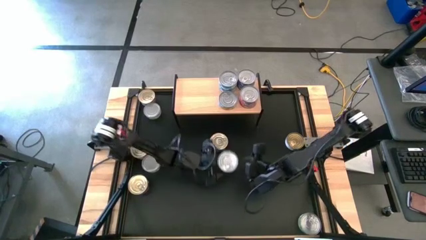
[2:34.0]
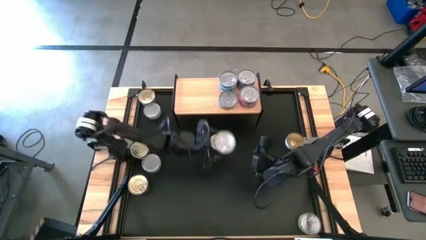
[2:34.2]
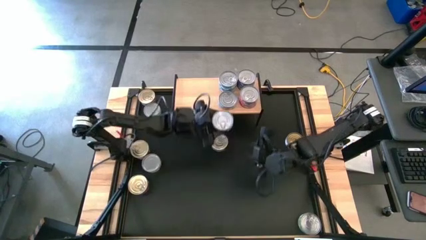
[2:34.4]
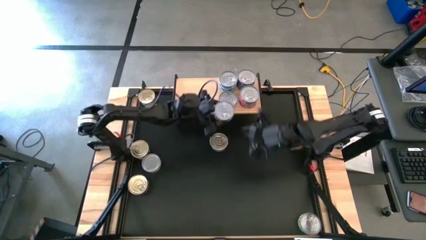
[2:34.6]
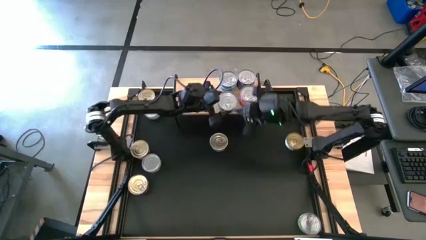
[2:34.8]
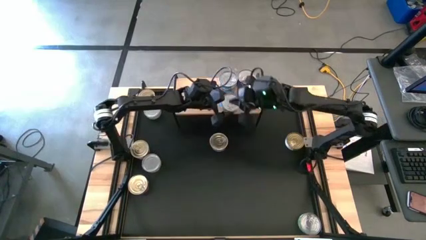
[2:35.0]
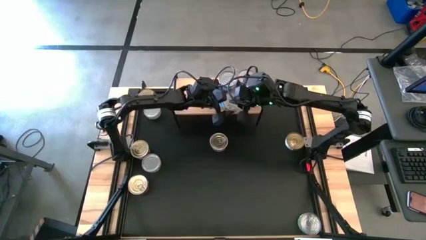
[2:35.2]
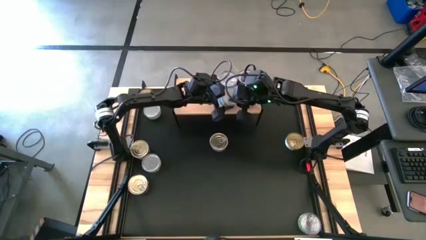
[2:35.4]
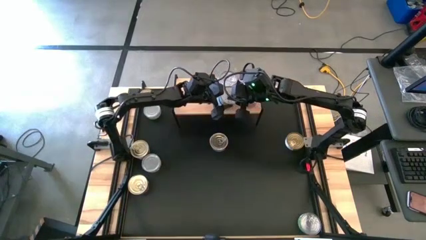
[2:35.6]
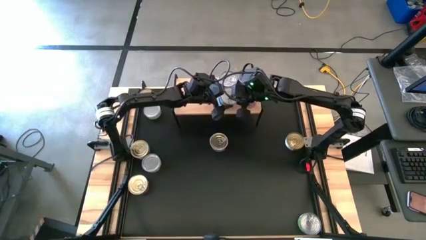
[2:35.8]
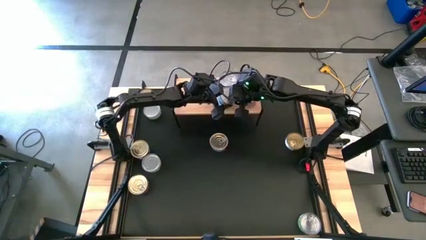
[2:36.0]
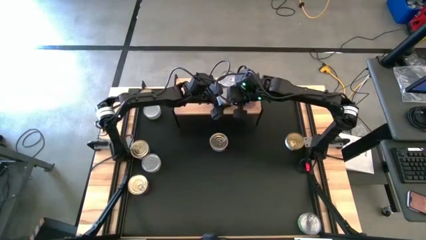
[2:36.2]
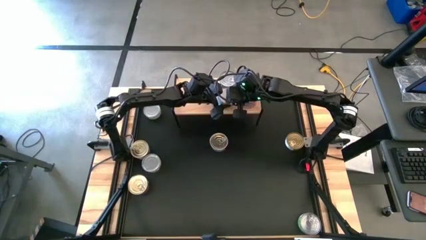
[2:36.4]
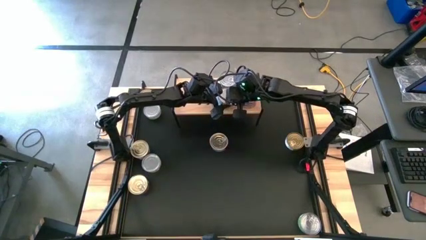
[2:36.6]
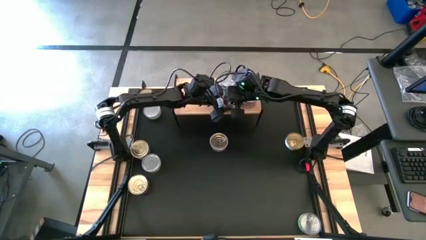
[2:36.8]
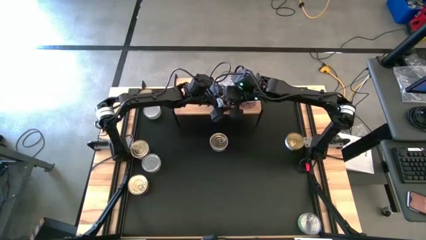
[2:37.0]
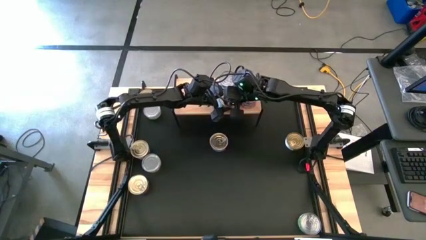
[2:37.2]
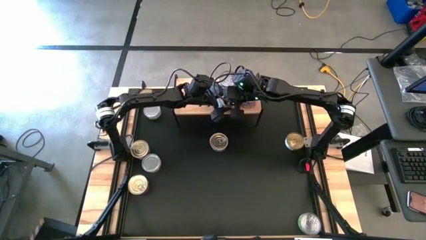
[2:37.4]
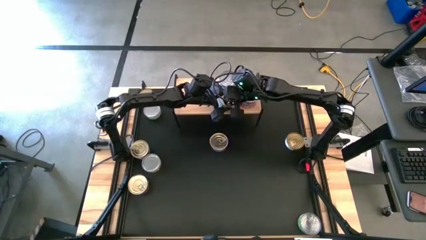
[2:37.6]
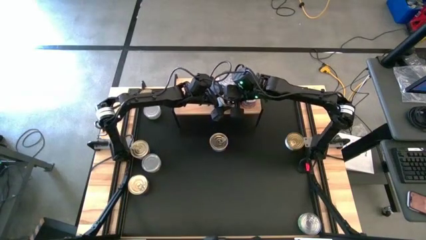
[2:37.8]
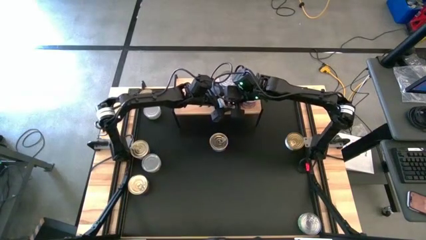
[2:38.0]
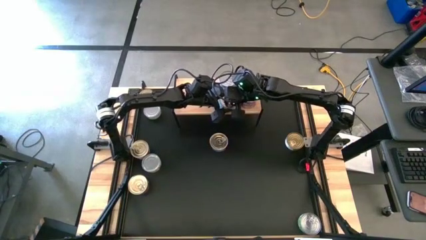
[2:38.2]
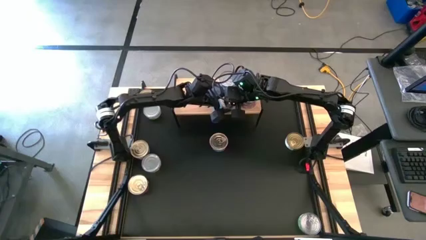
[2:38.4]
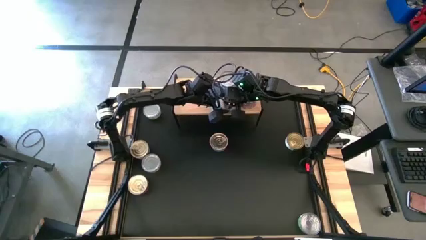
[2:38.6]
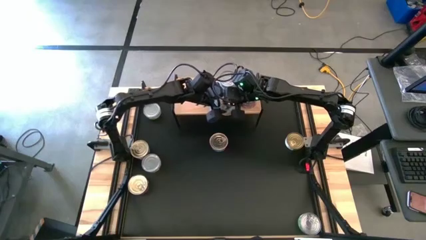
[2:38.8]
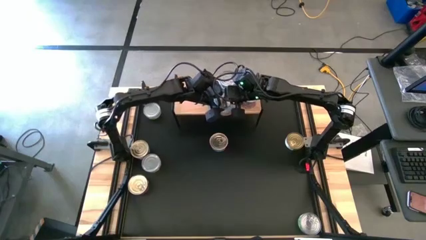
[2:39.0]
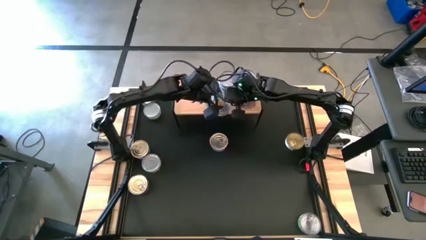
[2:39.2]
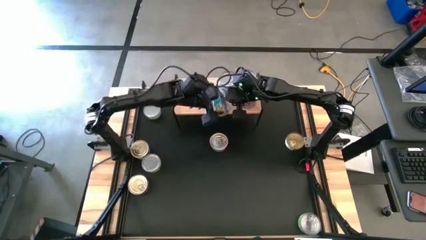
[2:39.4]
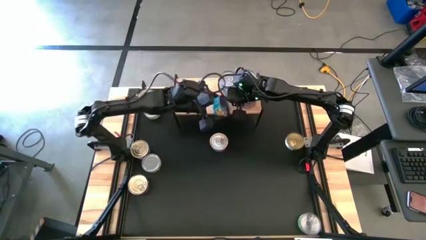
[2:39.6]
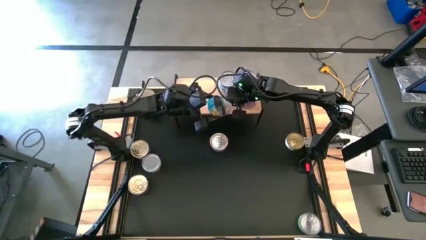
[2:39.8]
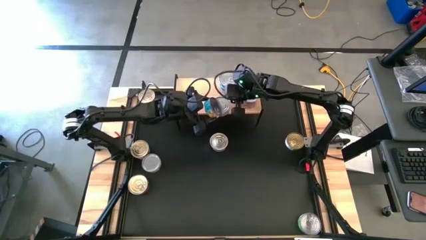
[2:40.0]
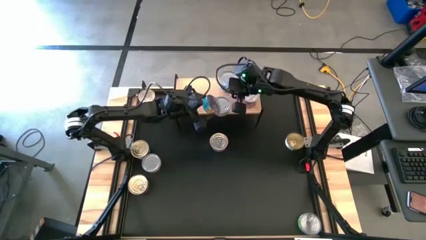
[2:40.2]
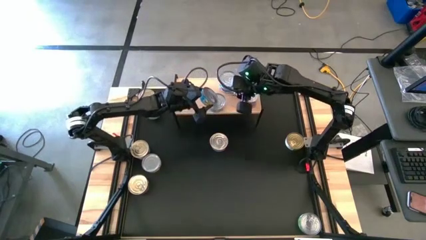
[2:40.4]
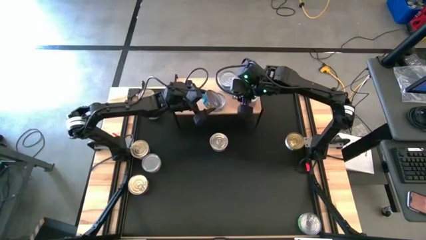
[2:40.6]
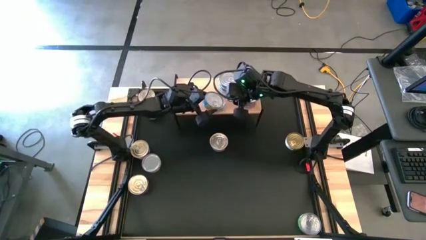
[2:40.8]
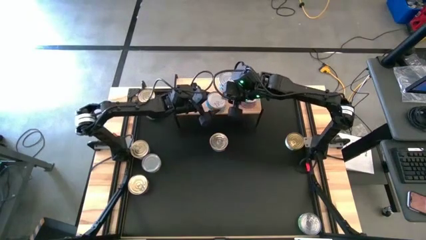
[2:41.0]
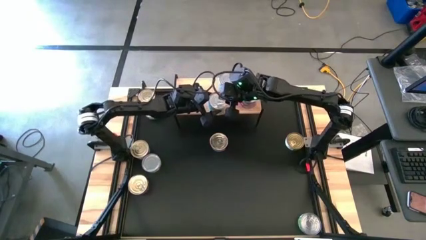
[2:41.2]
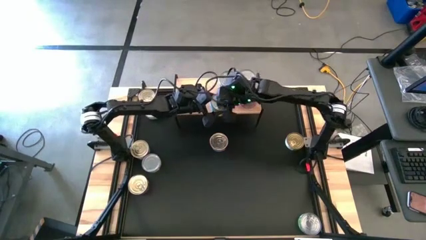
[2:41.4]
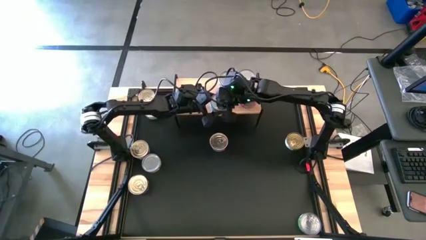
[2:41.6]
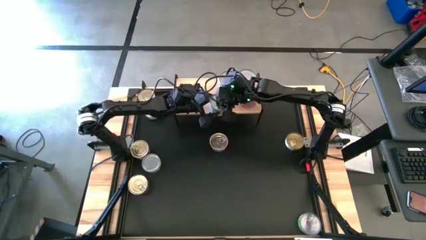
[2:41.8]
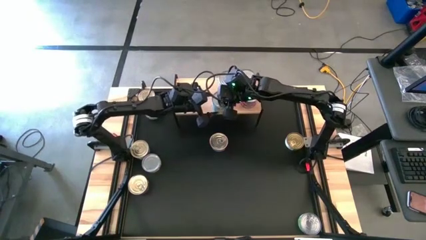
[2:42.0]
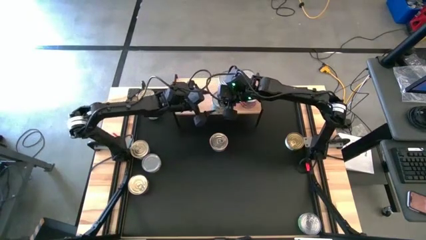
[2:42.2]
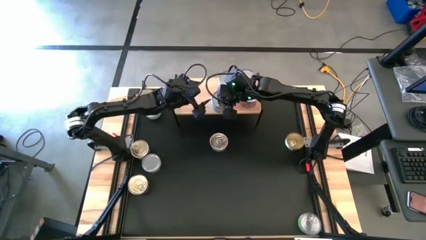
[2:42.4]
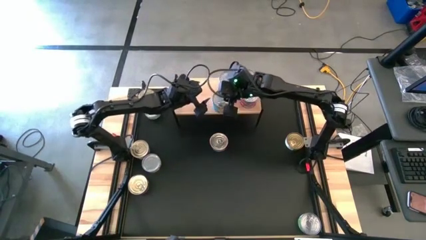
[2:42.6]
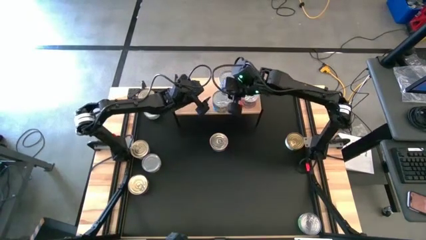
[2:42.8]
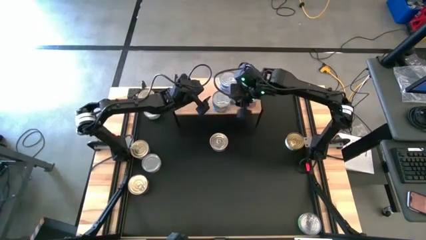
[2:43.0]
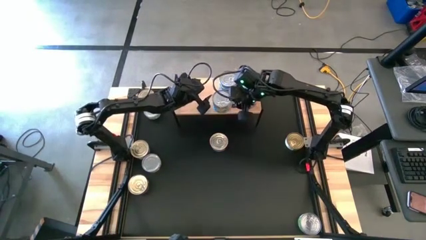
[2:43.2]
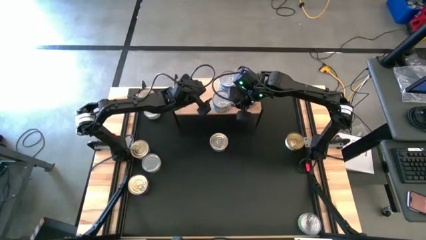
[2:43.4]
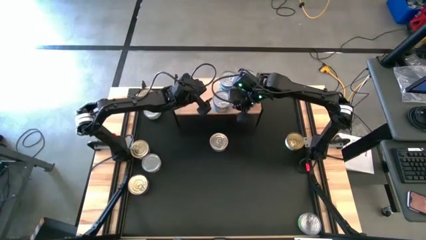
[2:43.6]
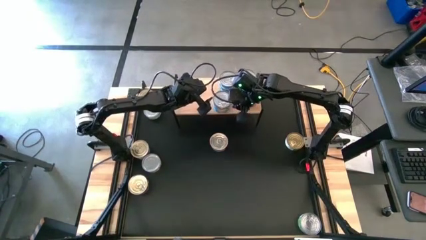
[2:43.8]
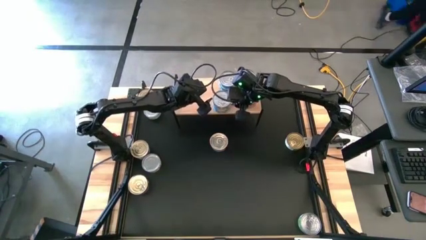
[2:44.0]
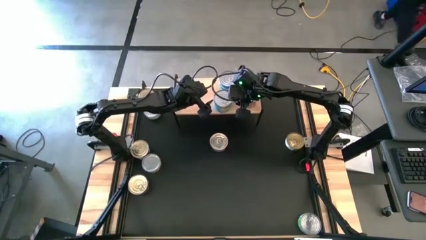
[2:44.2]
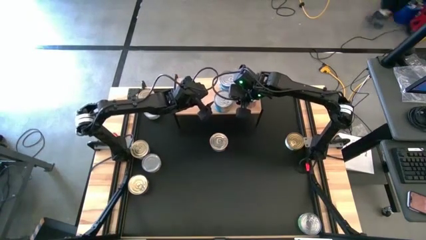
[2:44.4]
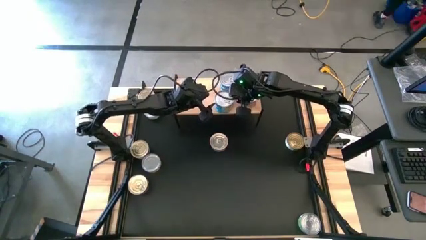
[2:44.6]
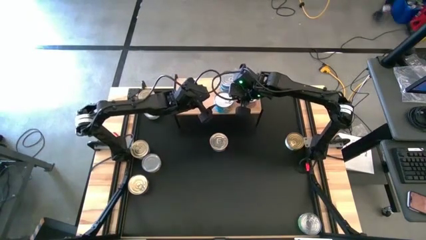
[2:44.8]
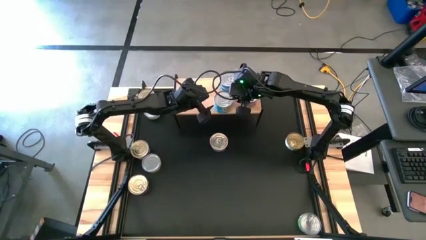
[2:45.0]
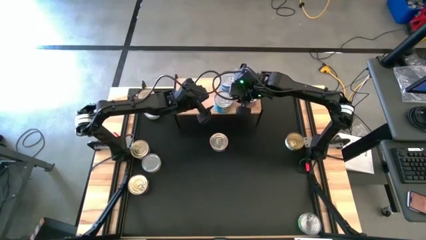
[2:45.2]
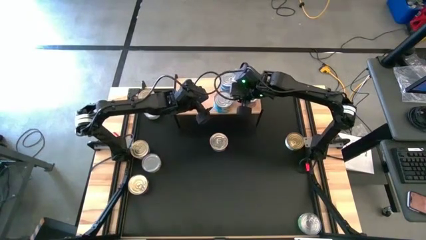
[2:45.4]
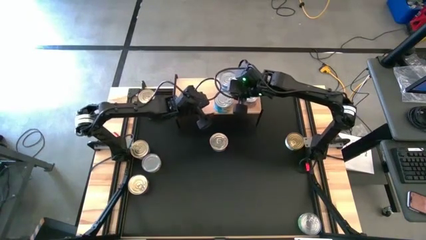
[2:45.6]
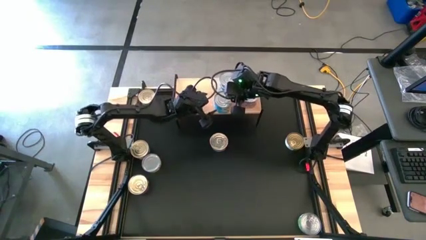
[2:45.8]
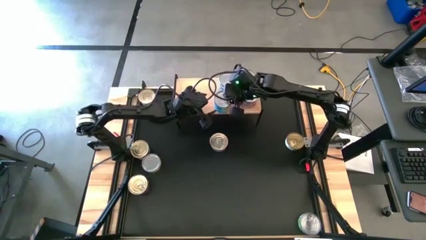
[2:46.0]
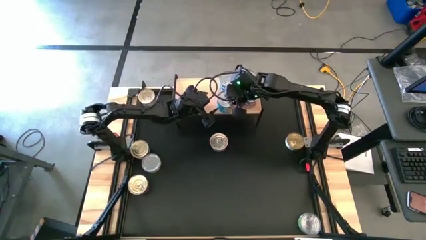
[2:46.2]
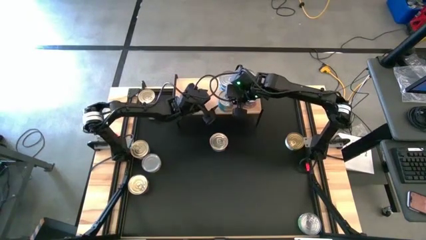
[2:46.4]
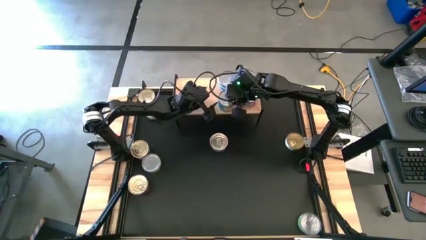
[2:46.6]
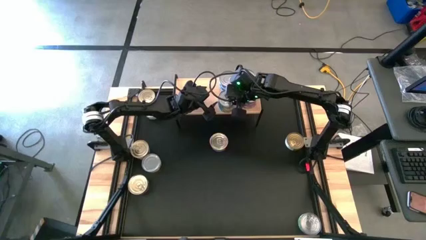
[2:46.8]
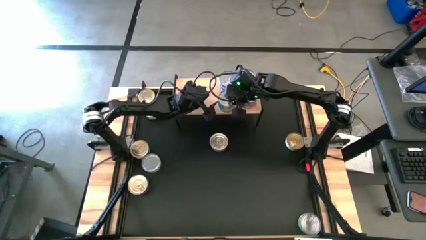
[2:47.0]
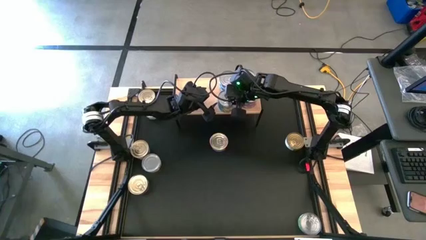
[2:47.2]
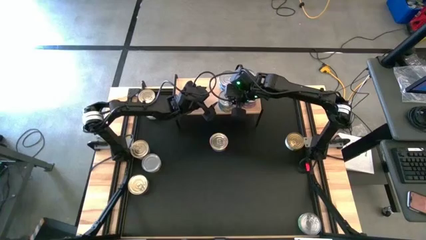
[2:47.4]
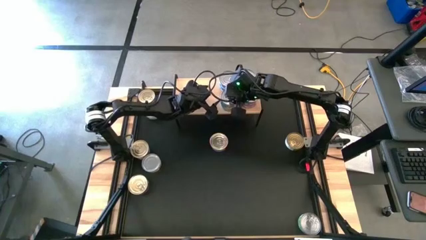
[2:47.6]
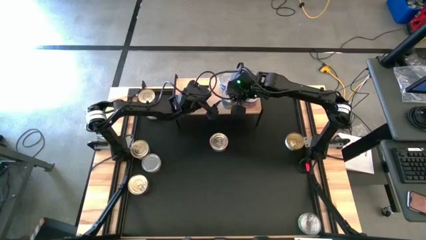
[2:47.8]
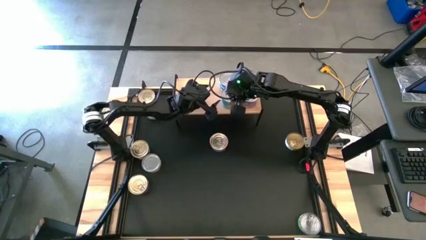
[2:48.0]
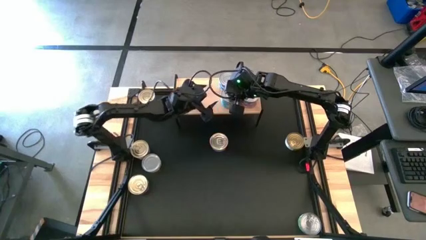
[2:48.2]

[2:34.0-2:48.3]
Task: Stack canned seafood by type on shelf
Stack the yellow blue tuna can on top of the other yellow tuna can on the shelf
